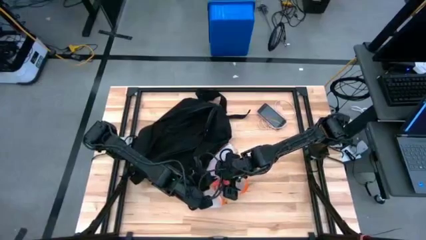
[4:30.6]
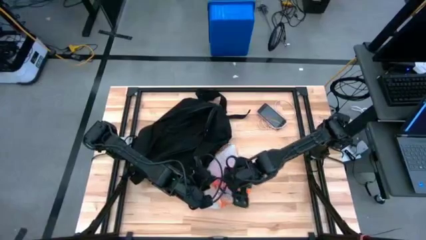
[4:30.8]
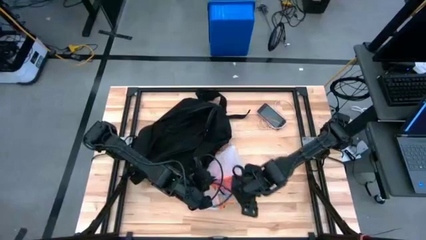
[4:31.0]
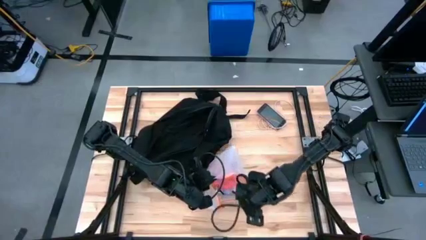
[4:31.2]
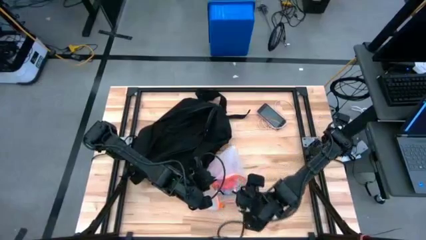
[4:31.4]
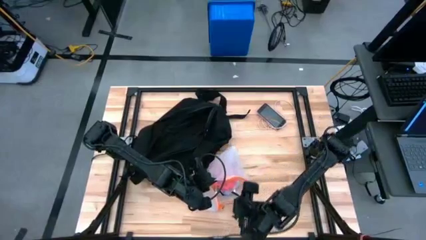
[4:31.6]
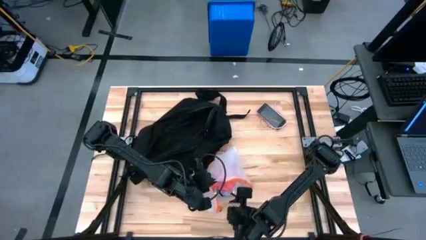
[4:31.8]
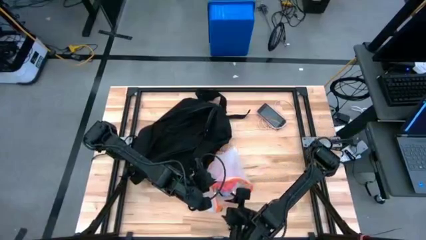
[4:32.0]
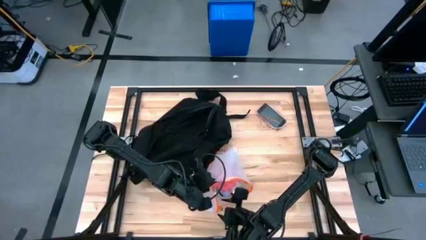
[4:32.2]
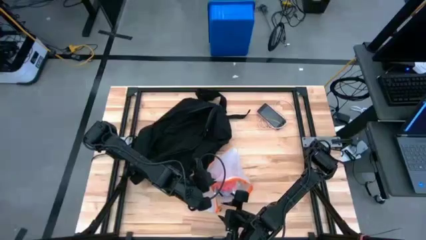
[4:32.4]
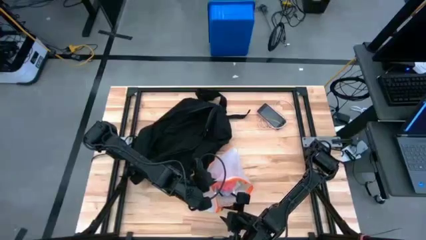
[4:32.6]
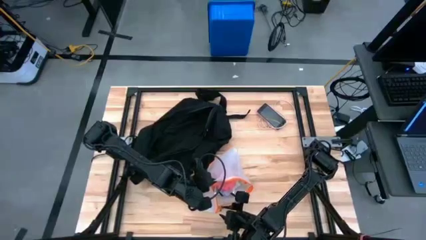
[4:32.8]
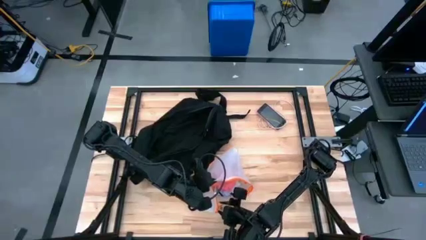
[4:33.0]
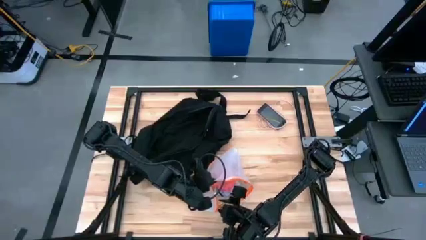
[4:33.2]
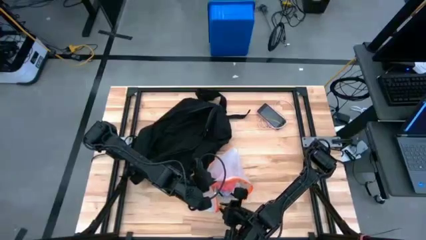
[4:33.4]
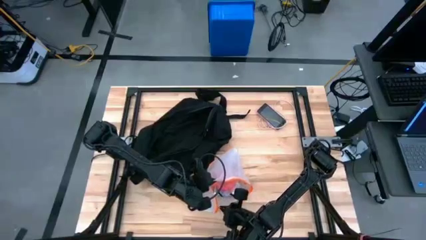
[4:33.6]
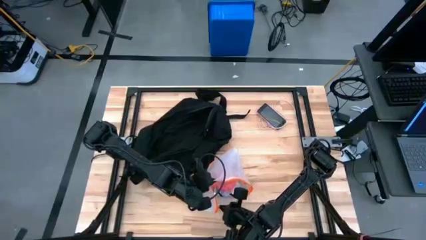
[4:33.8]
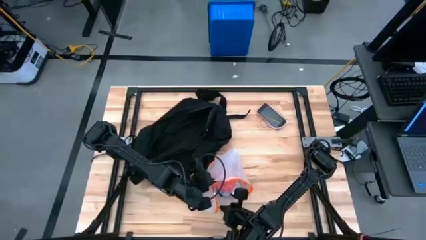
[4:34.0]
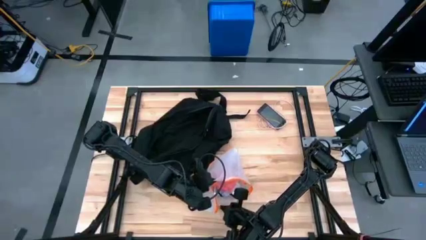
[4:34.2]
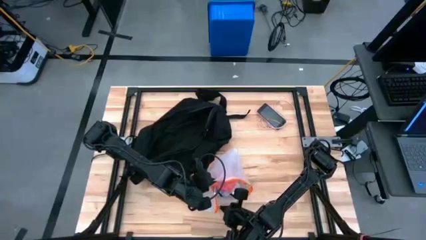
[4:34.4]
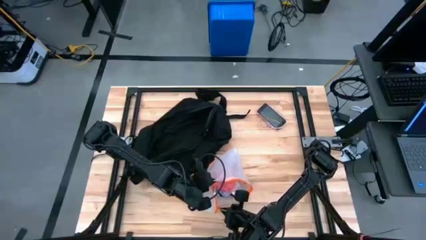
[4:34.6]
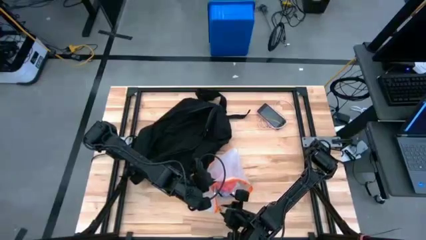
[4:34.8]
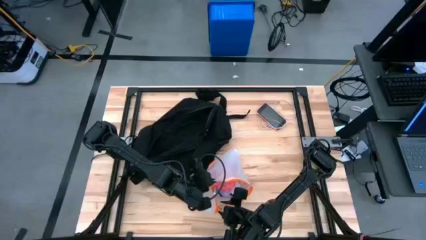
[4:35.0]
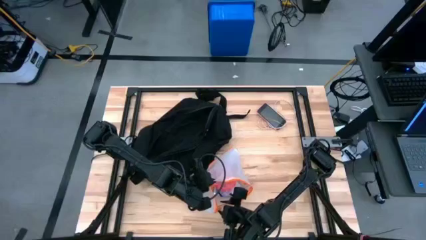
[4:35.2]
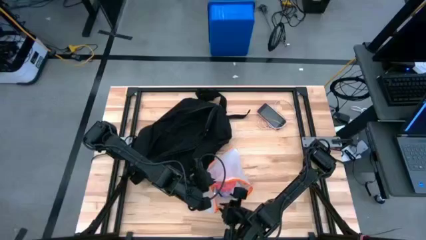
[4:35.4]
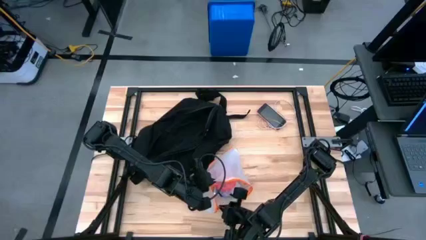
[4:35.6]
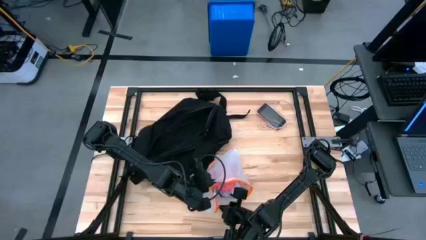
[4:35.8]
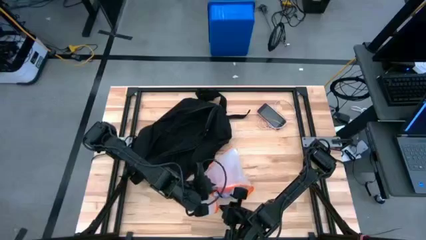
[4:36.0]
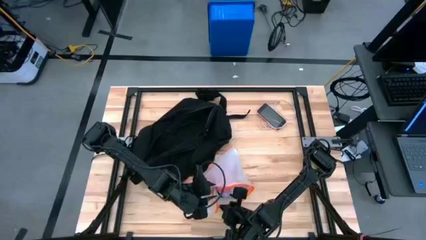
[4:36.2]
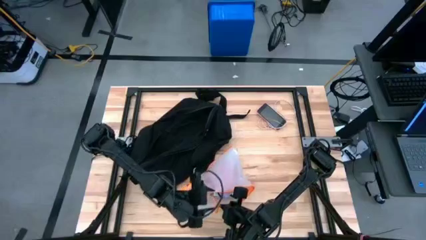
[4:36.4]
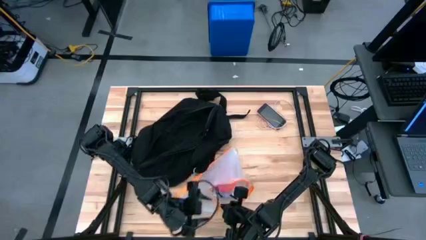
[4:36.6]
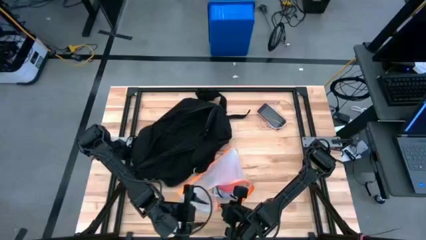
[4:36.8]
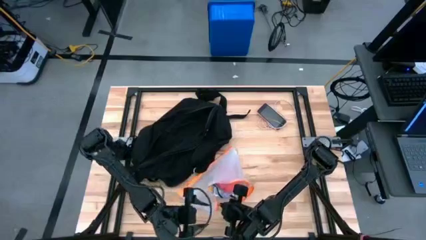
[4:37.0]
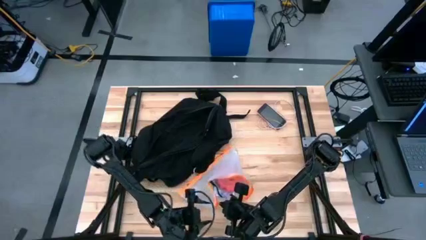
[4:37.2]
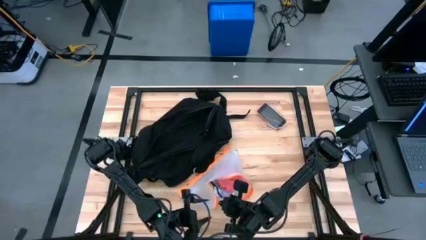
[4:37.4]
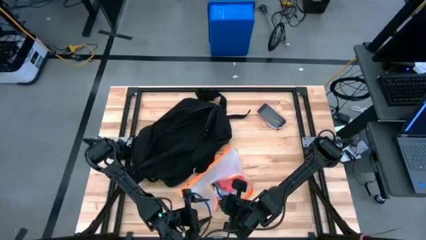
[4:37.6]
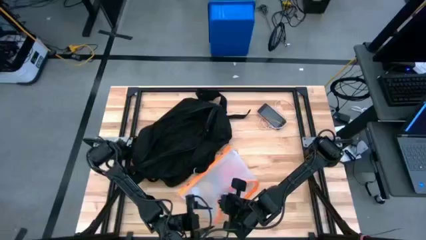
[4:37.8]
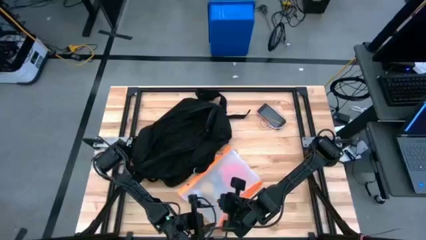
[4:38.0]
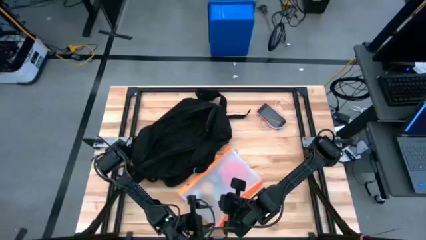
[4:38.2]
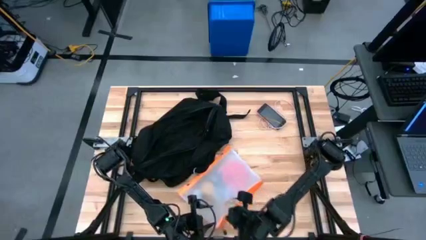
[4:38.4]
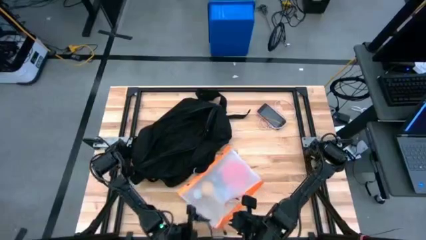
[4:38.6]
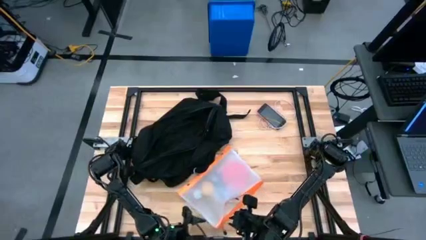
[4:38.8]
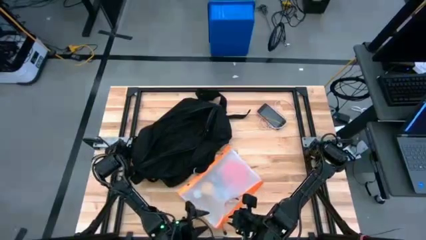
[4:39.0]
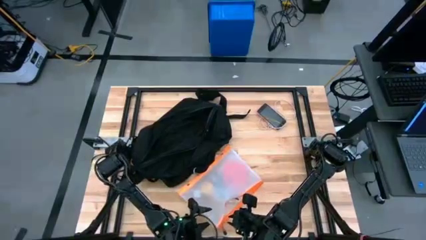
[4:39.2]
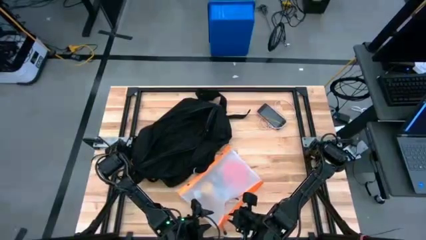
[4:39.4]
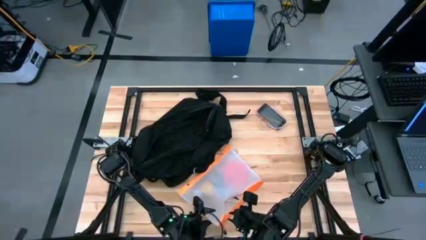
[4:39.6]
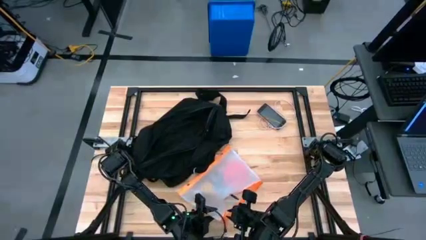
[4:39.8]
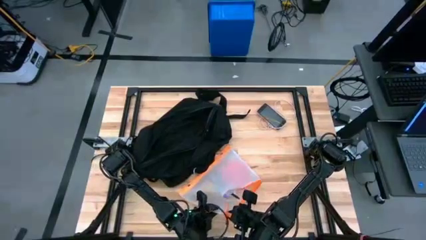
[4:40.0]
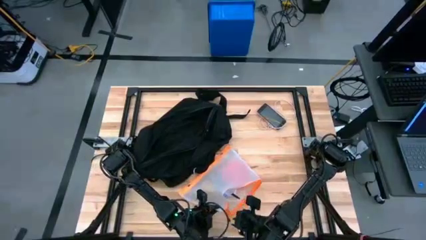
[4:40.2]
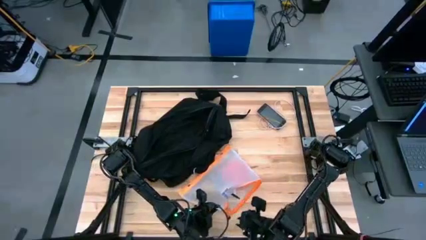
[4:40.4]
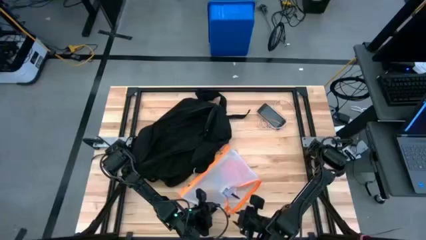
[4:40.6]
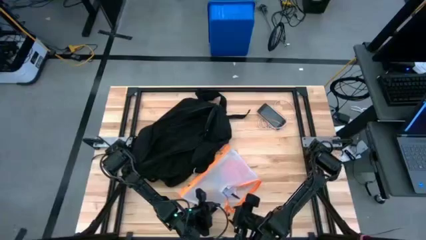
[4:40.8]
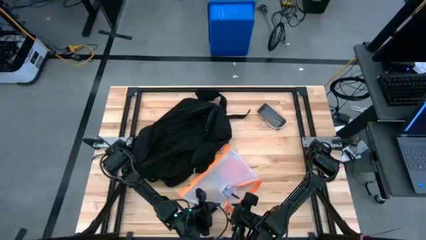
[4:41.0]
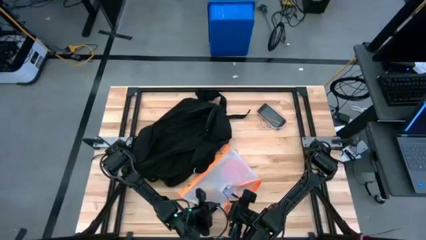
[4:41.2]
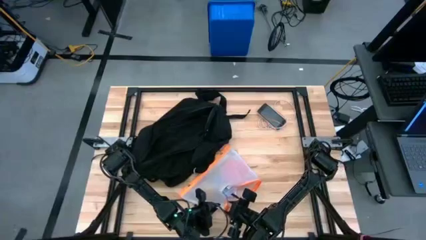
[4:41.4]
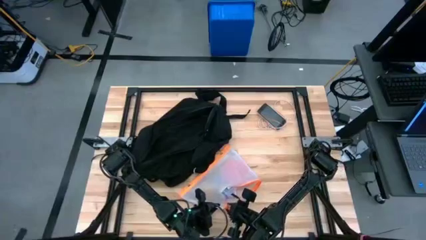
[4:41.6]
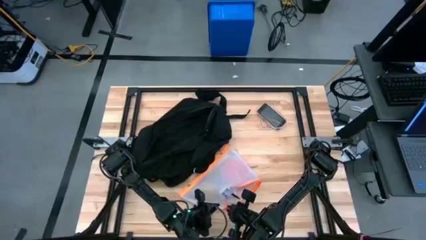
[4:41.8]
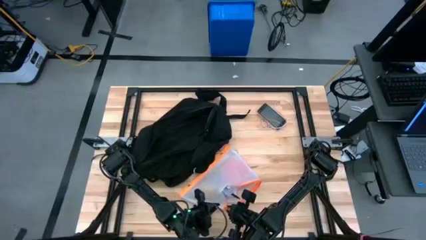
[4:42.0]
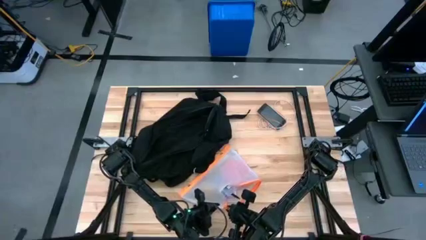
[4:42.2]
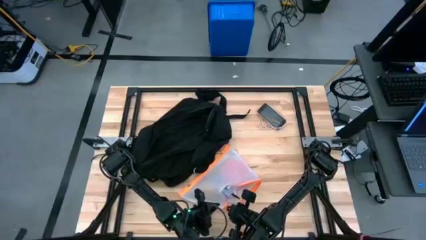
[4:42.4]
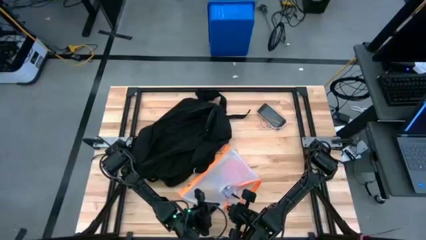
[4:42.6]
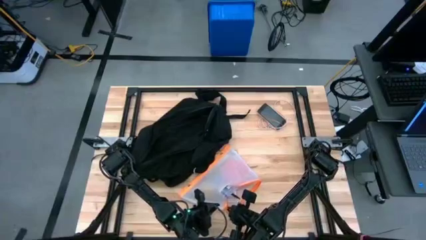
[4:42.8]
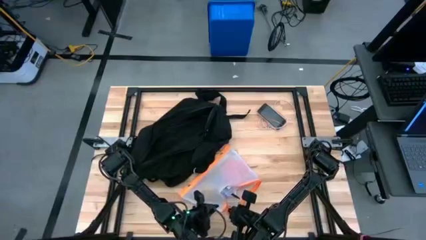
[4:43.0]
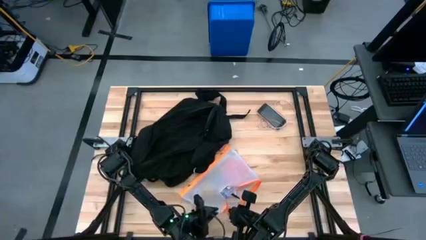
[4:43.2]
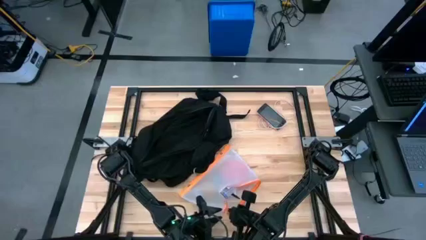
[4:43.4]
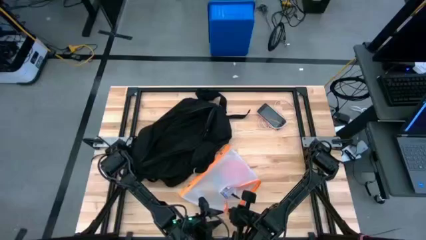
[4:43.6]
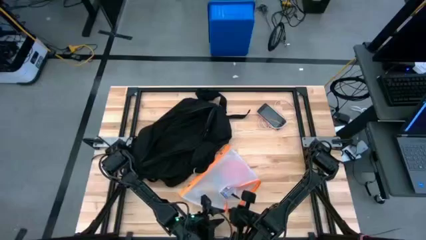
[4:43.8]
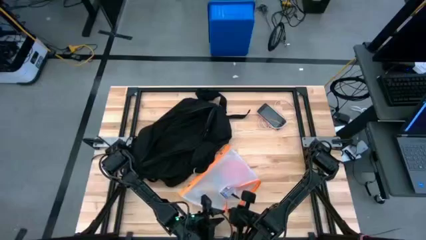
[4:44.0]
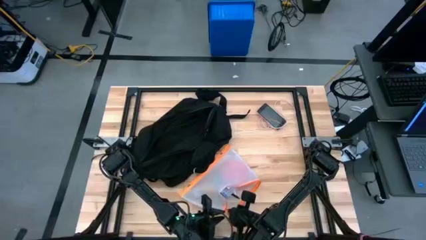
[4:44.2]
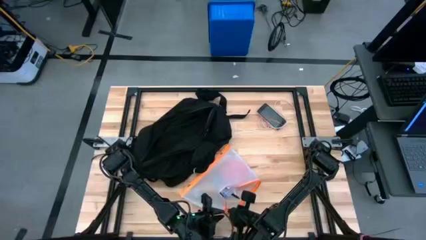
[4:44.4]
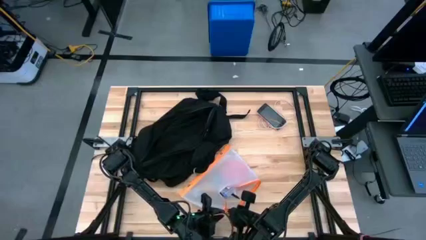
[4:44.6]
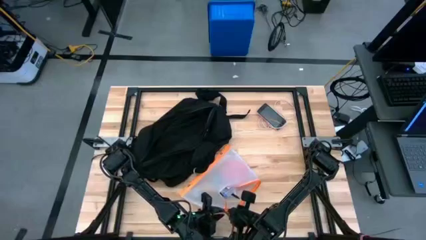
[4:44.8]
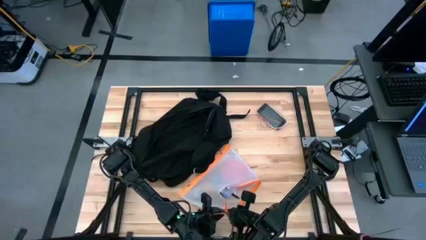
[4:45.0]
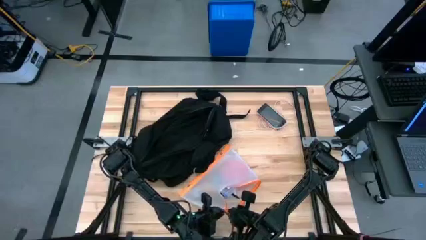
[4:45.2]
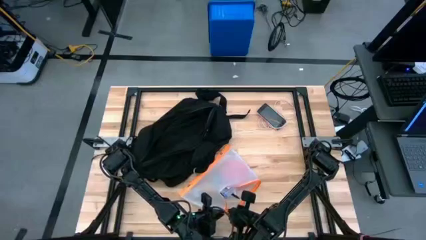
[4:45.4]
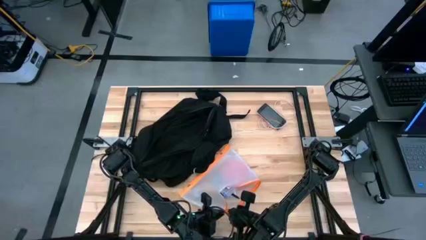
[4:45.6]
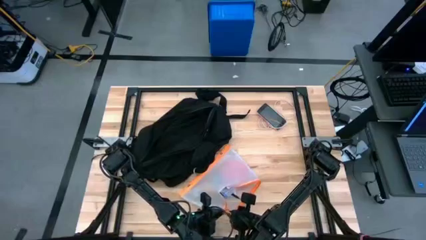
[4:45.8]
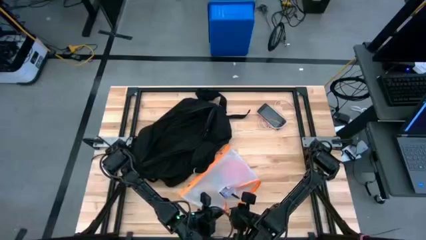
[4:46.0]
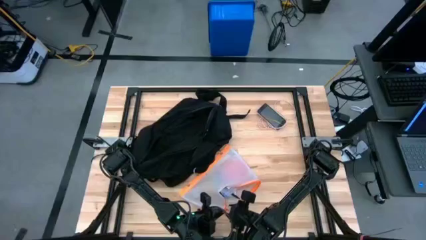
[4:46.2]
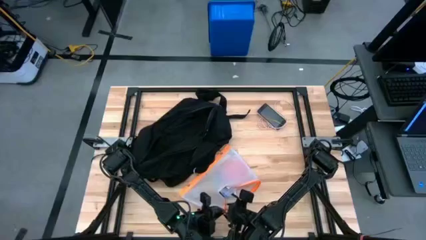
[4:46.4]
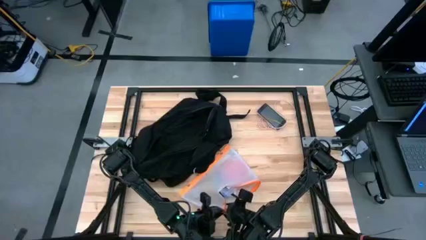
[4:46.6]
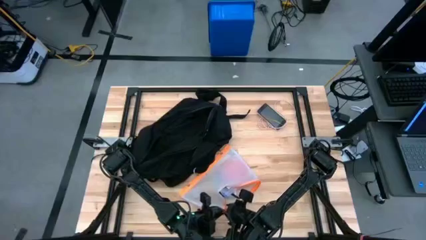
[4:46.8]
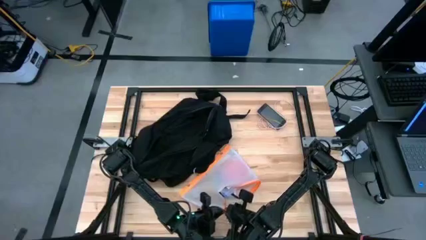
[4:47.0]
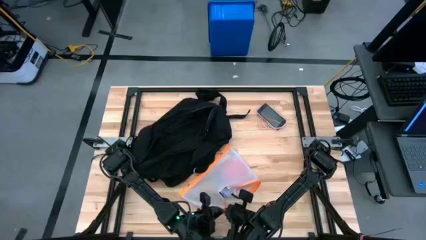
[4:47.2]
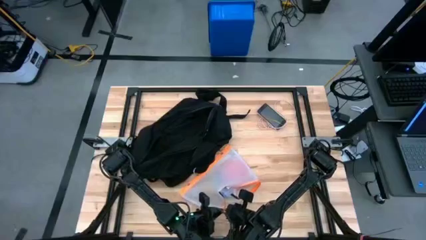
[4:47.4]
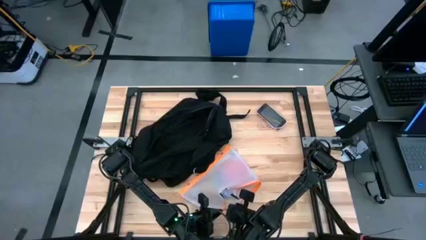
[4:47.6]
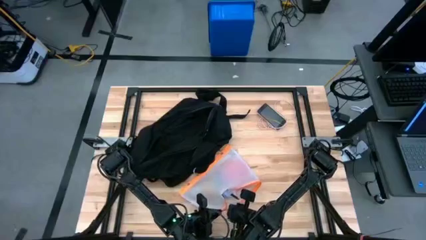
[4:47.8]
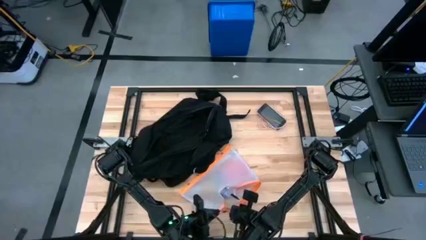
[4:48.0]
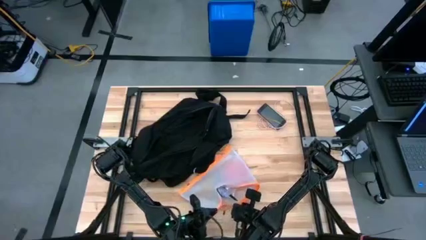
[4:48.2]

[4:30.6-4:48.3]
Task: Unpack backpack
Close the orange zip bag
